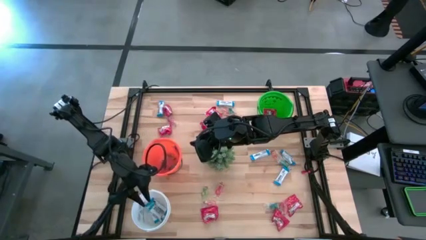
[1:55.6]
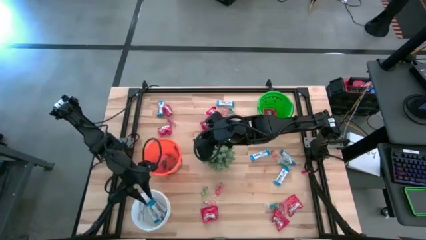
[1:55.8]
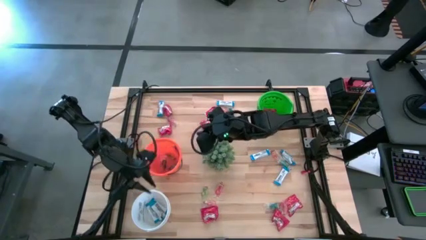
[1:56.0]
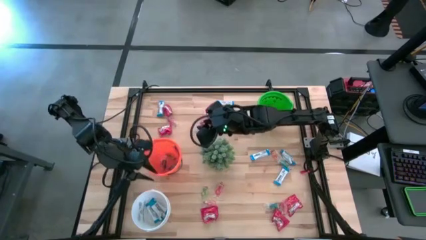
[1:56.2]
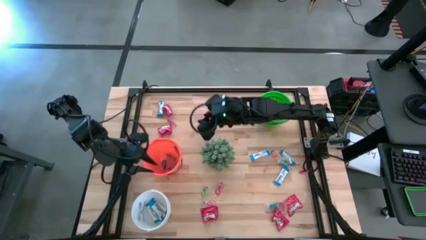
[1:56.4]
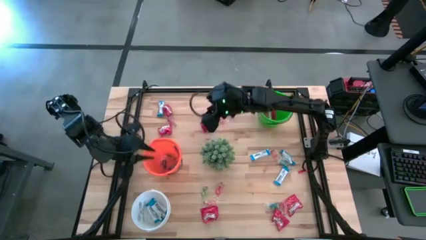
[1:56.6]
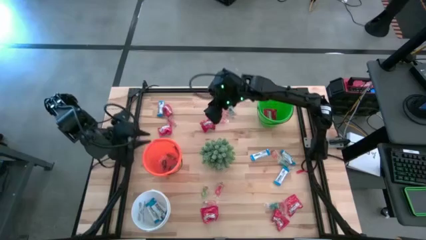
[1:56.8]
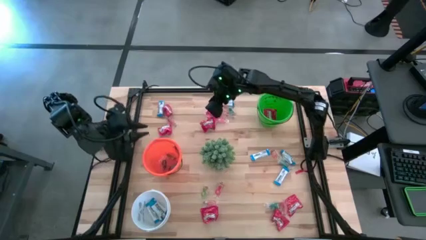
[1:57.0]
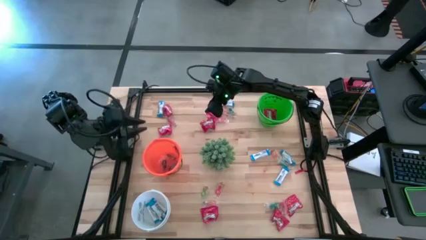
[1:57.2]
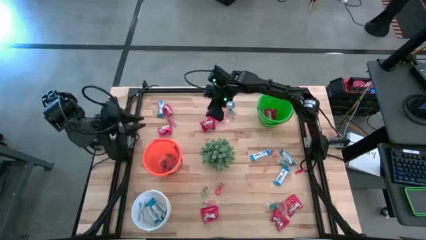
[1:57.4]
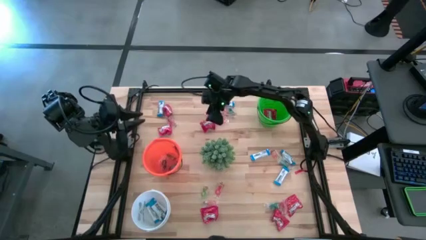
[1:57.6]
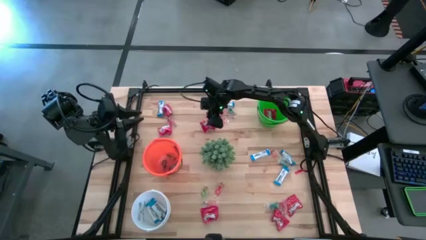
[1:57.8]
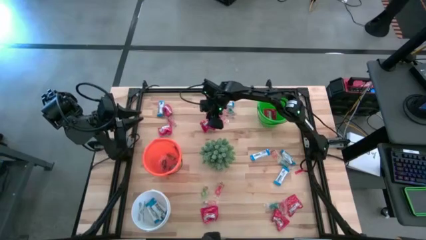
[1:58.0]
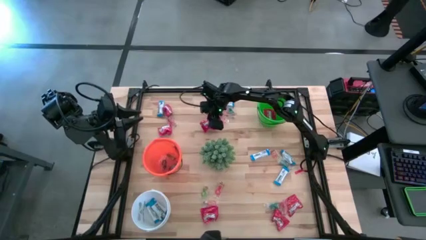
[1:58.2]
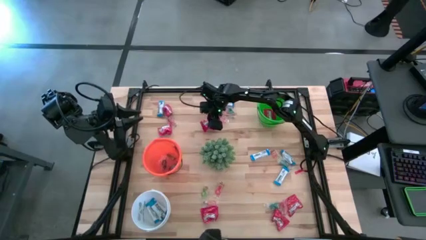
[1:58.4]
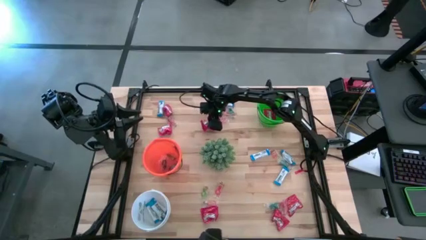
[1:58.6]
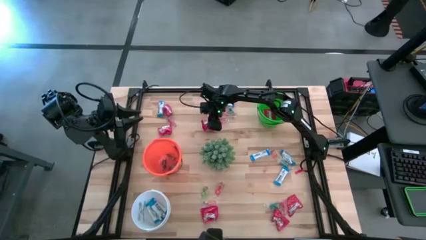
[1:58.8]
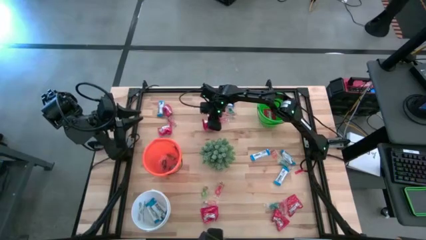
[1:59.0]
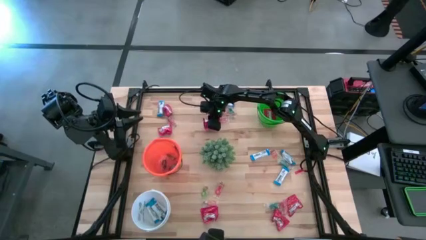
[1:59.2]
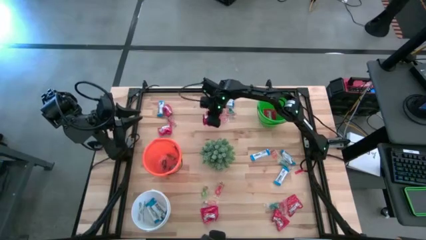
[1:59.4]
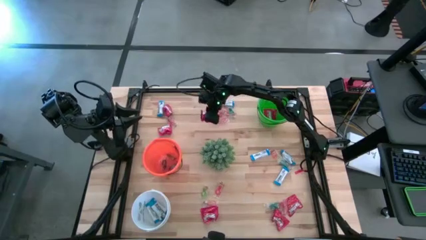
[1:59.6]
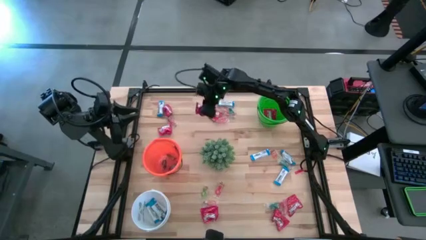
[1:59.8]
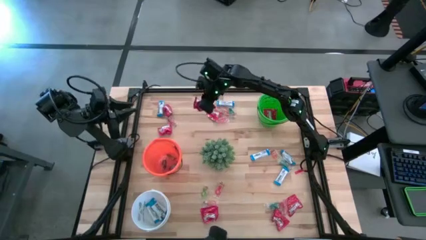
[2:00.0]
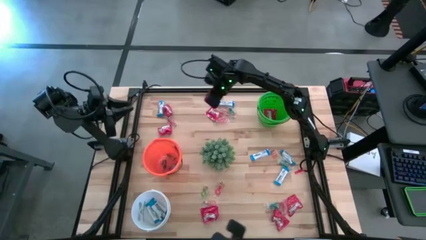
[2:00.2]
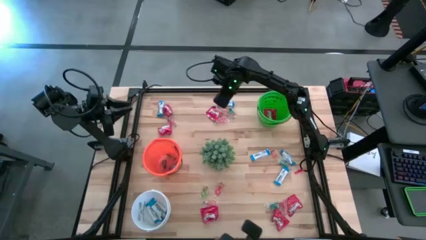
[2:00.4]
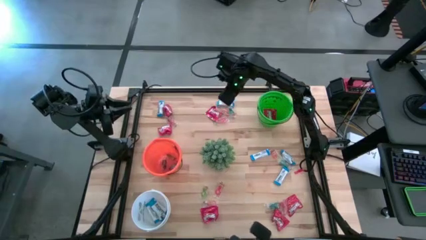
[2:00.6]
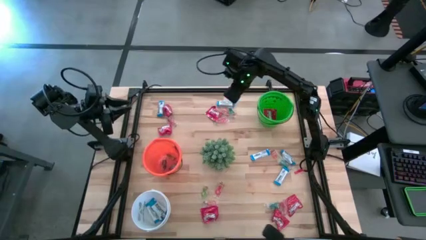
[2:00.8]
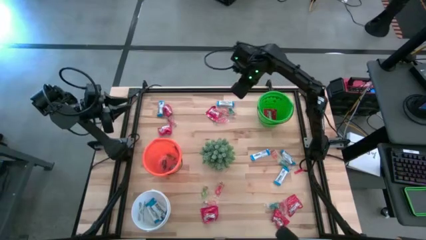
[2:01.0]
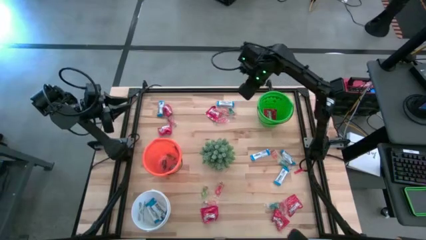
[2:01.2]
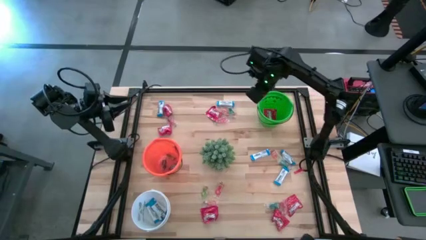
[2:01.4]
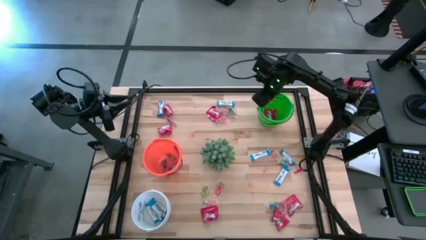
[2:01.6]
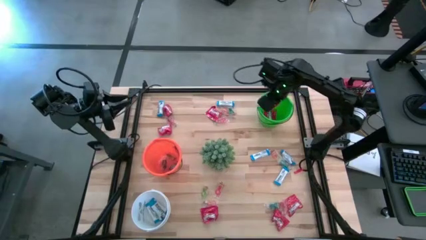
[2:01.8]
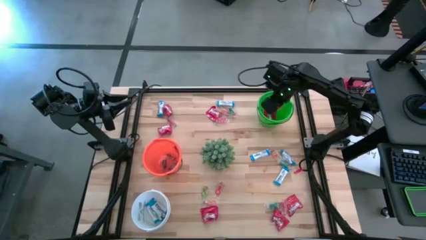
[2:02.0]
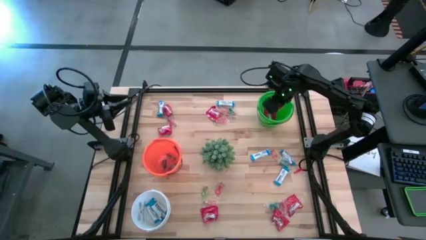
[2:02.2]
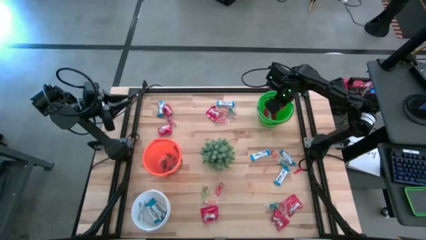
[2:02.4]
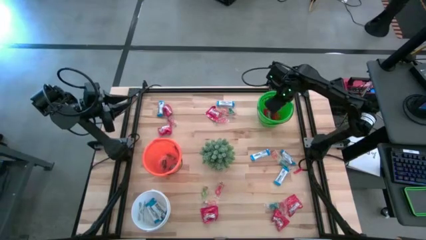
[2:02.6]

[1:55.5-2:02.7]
Task: Sort candy
Put the red candy into the green bucket

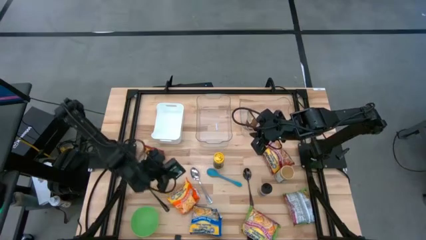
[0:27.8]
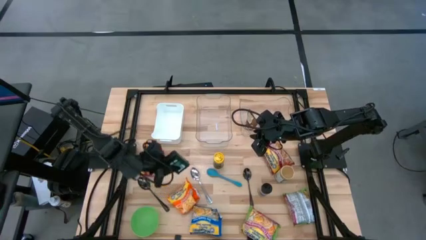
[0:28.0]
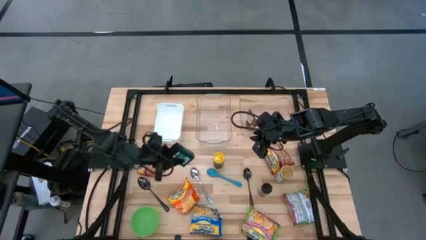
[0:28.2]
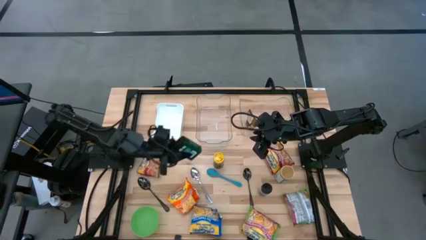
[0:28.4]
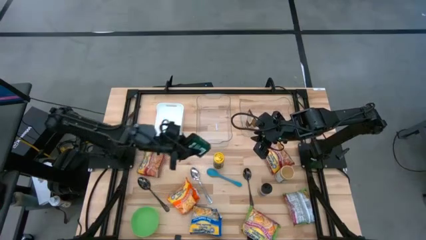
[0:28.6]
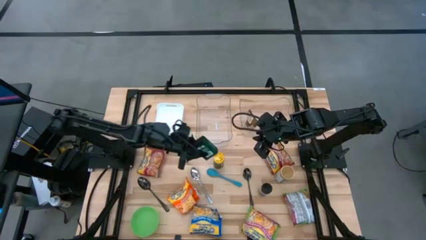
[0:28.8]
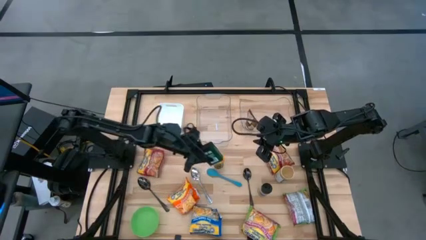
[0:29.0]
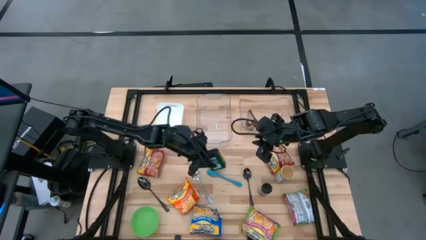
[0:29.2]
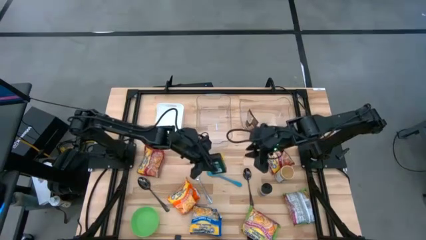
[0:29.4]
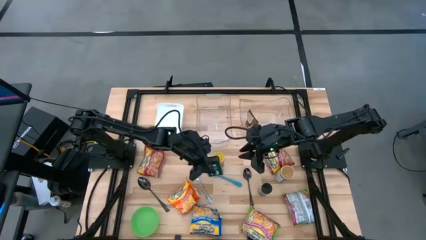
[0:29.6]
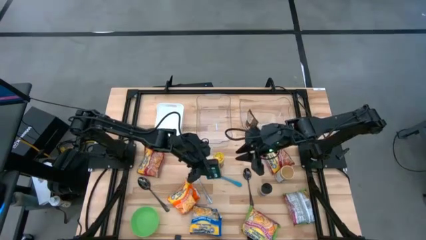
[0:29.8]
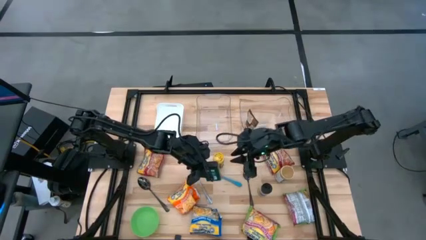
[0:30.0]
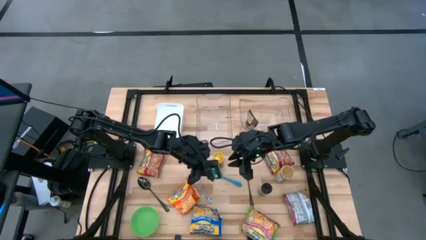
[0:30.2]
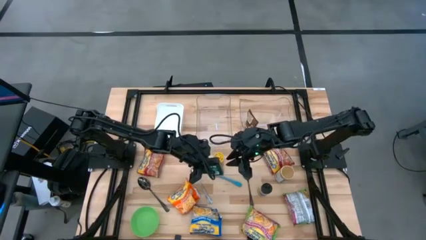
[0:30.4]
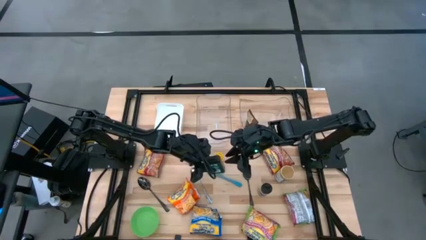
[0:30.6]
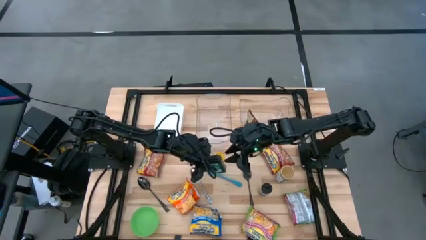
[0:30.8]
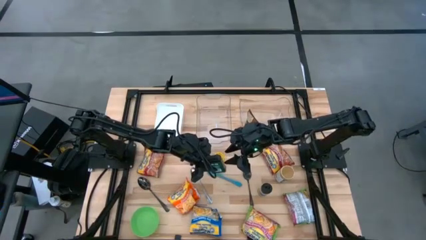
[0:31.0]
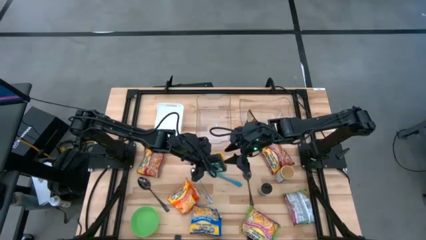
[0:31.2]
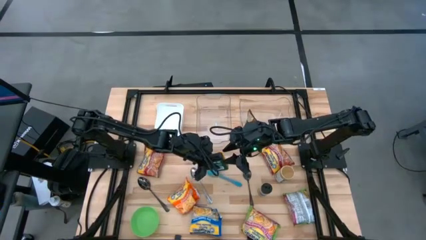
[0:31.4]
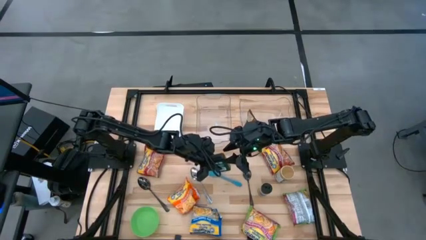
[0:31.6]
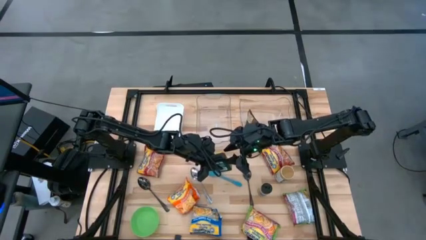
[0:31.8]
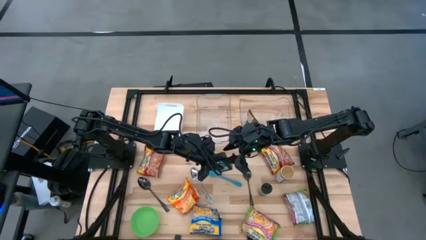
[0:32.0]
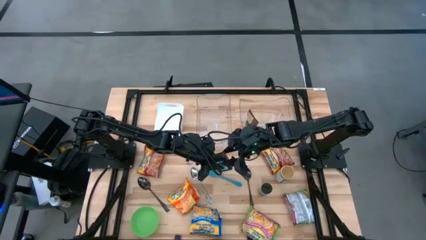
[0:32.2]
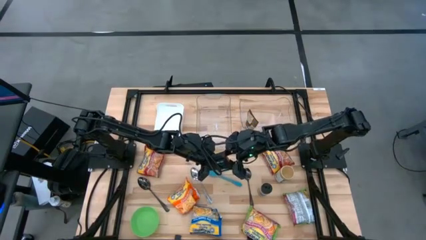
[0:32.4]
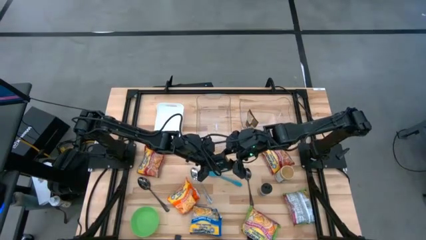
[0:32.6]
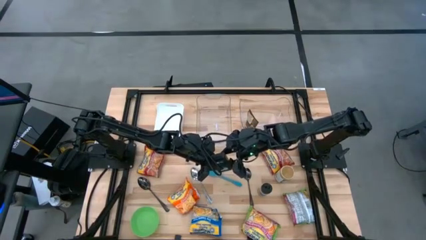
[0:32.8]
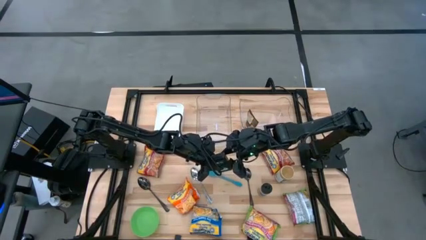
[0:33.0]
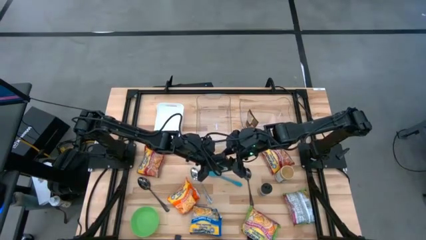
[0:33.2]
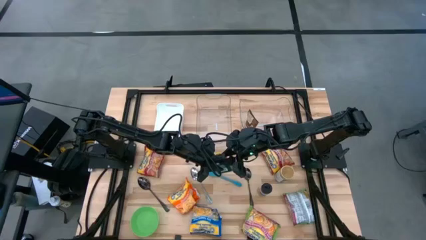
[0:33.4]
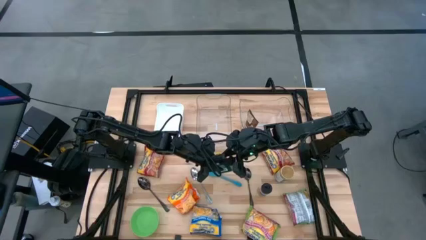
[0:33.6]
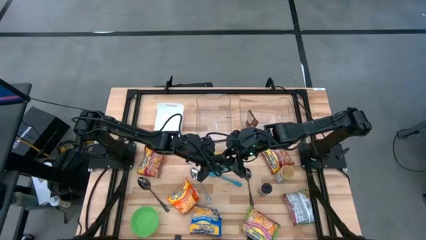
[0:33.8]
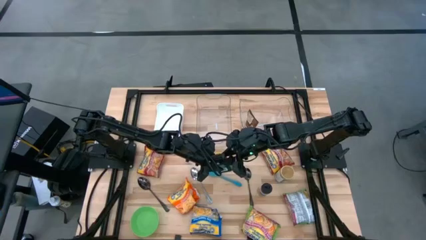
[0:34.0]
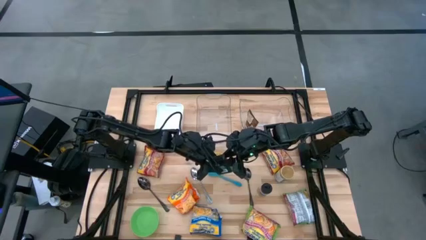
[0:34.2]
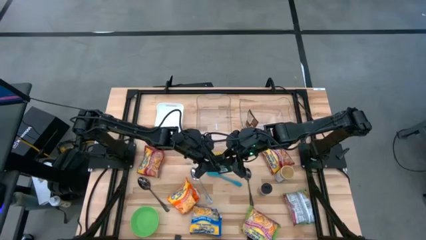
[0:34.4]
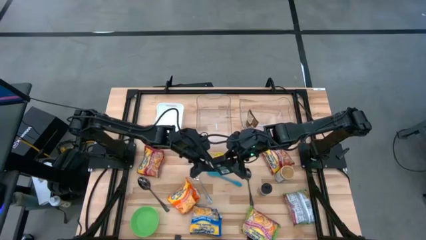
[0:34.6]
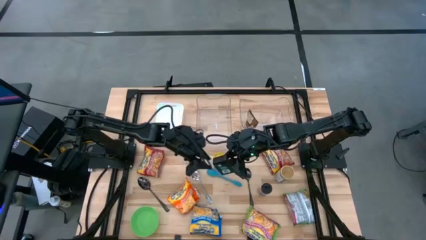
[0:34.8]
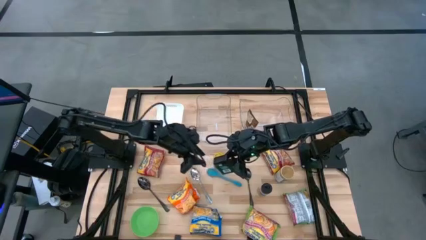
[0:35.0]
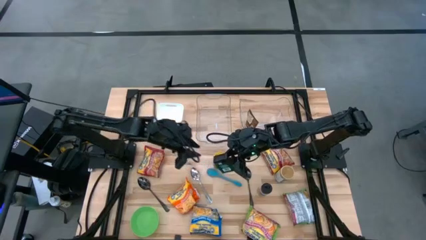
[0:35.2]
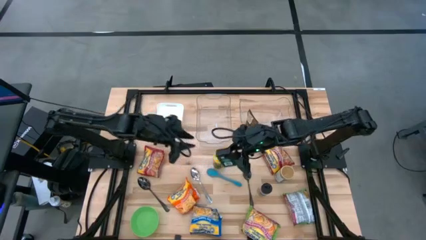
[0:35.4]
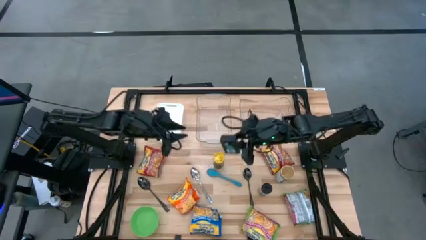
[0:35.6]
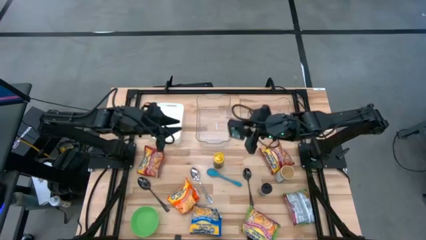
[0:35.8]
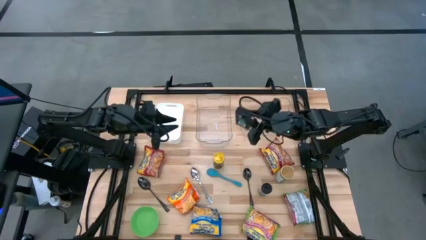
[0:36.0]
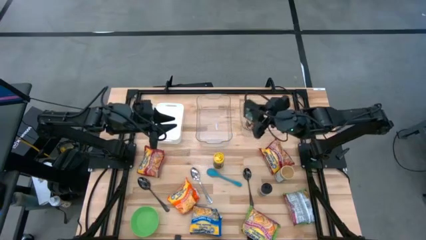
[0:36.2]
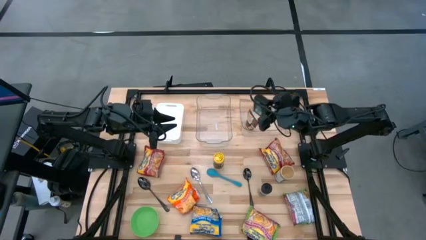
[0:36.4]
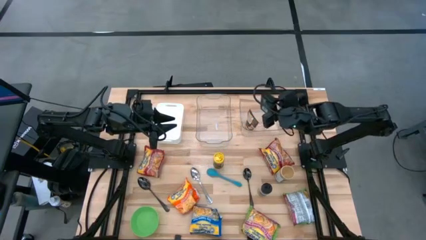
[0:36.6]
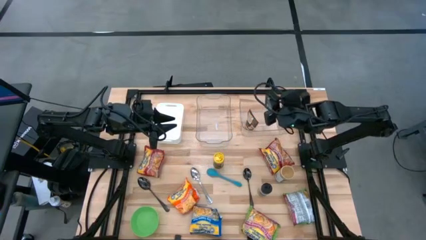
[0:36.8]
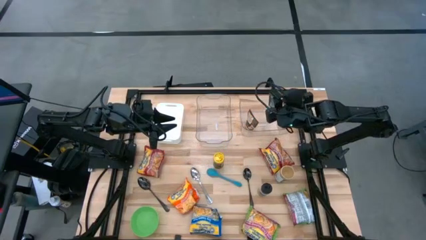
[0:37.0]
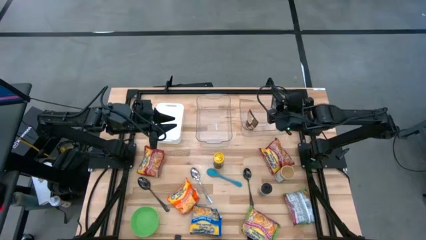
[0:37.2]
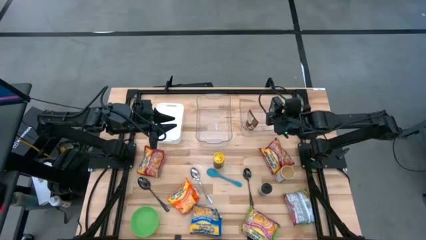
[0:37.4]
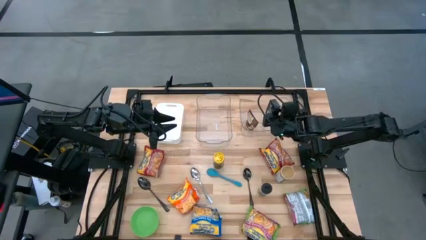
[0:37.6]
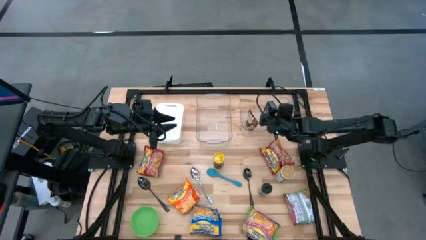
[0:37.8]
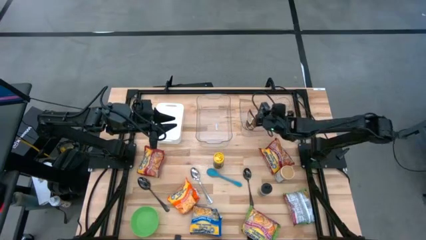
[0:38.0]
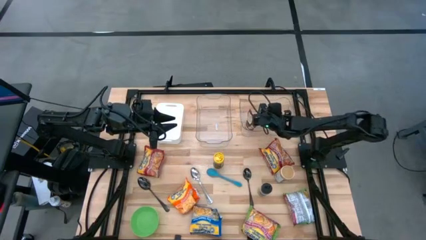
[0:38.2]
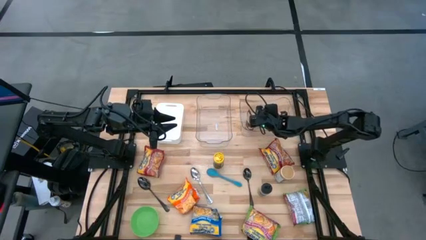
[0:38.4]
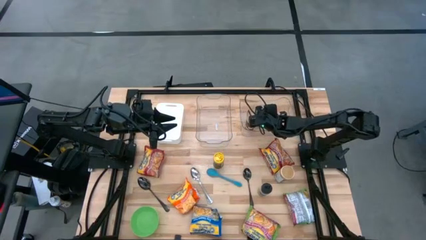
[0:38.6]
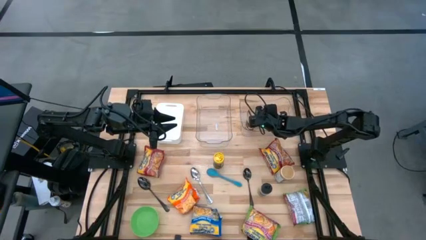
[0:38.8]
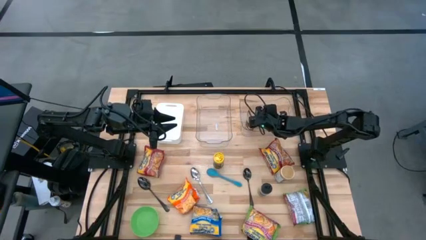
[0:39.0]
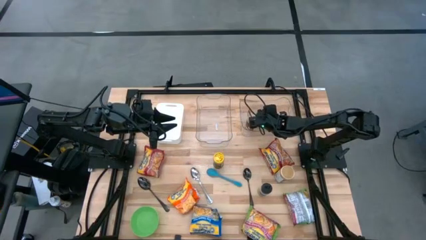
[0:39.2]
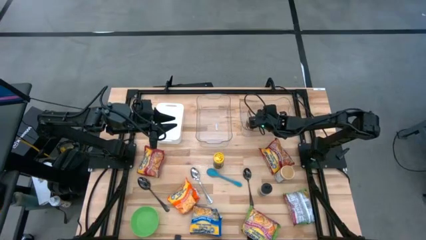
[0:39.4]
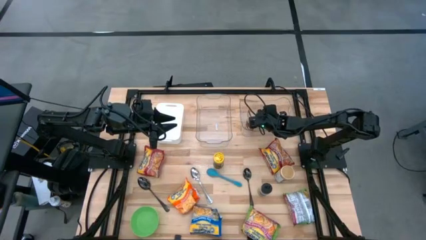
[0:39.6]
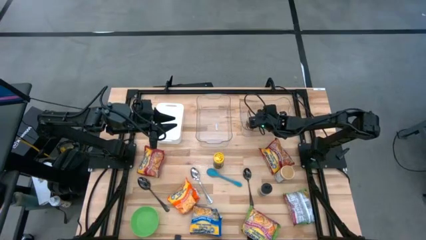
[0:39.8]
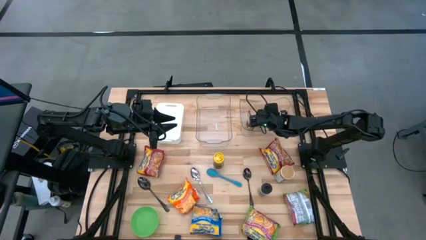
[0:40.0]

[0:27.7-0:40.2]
Task: Pick & Place Food Item
Put the black spice can into the right transparent bin
